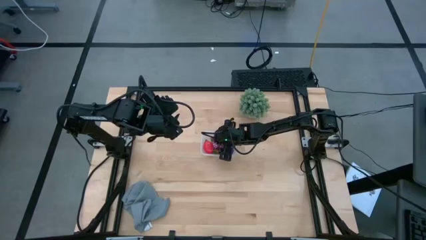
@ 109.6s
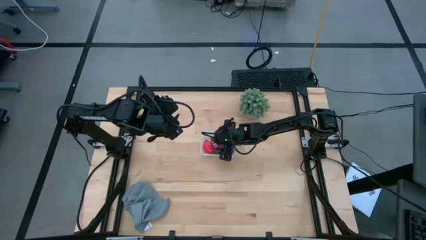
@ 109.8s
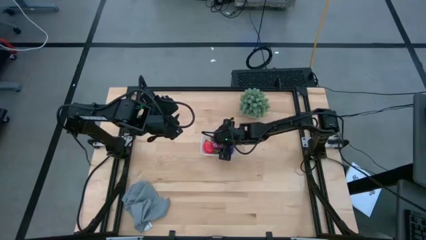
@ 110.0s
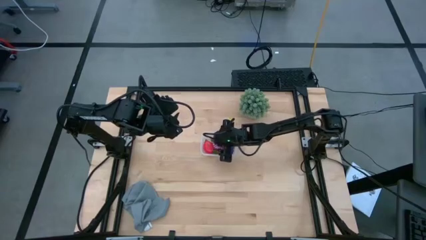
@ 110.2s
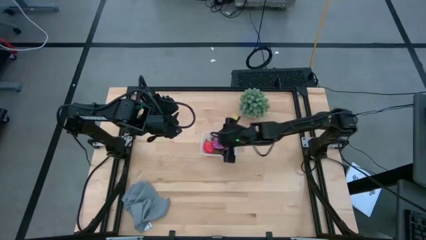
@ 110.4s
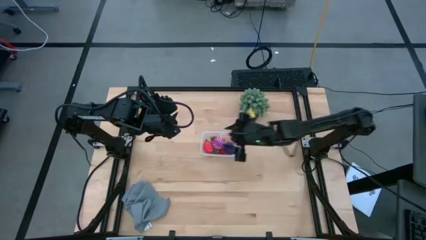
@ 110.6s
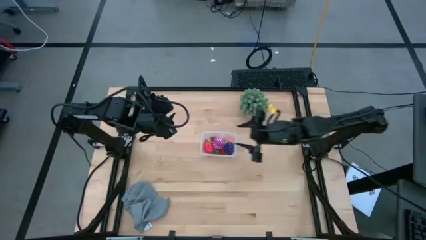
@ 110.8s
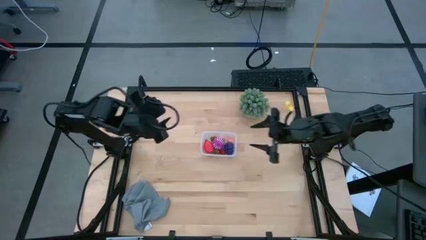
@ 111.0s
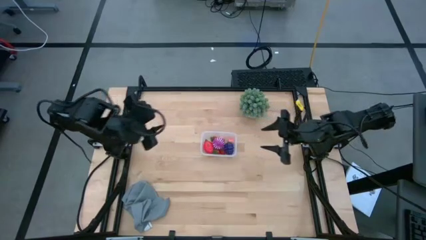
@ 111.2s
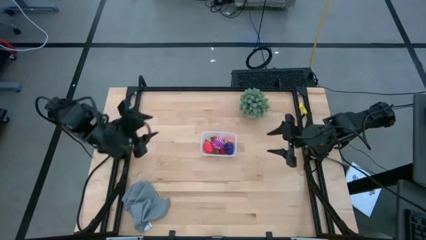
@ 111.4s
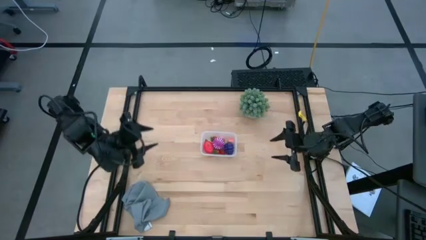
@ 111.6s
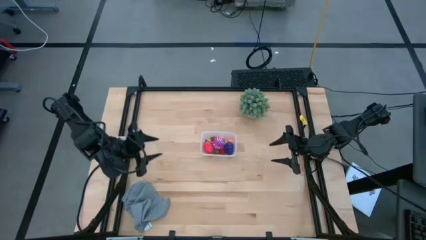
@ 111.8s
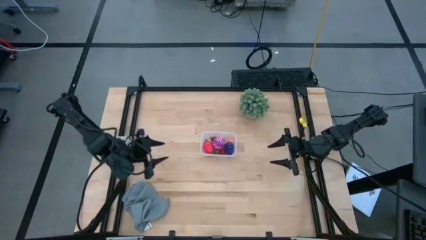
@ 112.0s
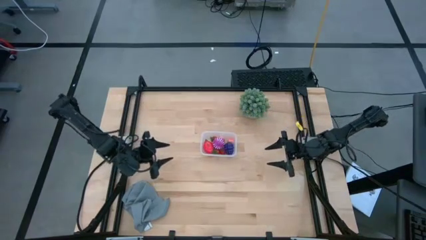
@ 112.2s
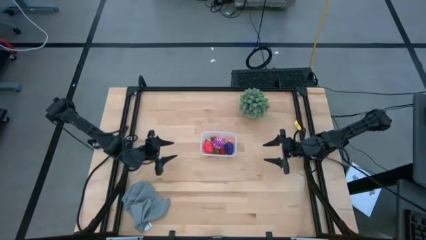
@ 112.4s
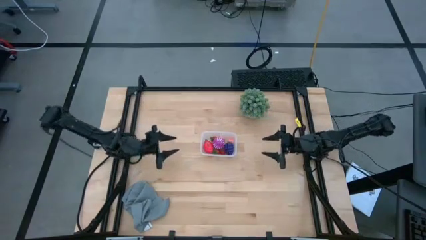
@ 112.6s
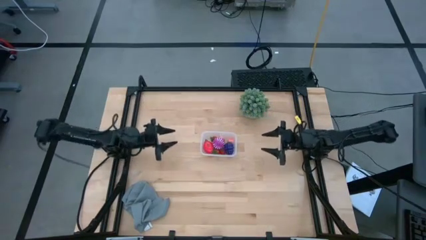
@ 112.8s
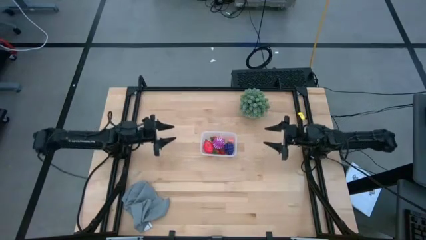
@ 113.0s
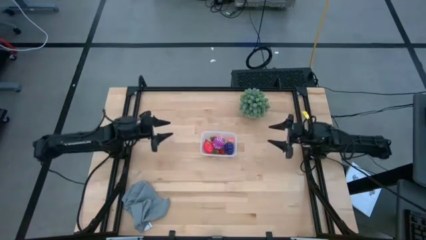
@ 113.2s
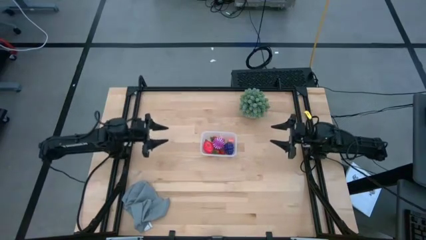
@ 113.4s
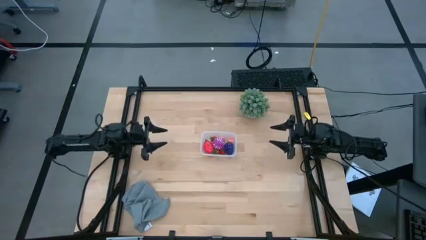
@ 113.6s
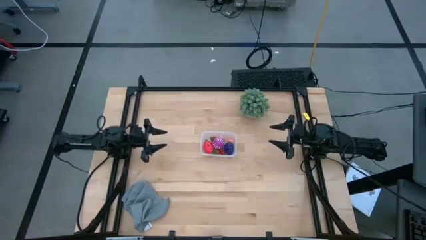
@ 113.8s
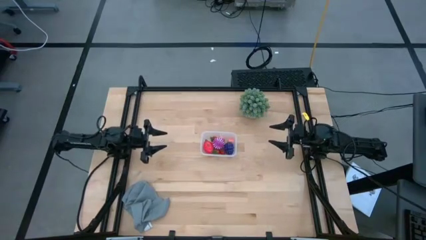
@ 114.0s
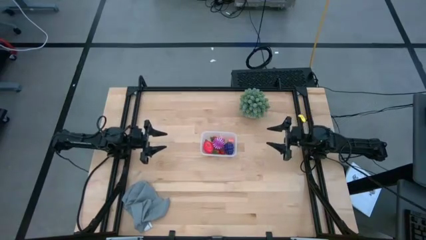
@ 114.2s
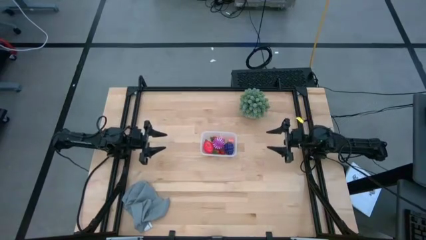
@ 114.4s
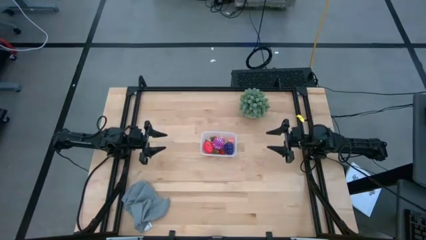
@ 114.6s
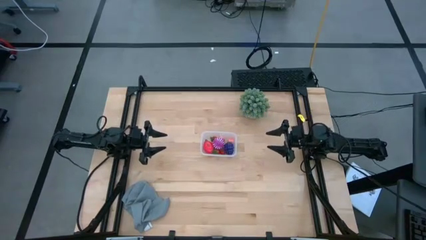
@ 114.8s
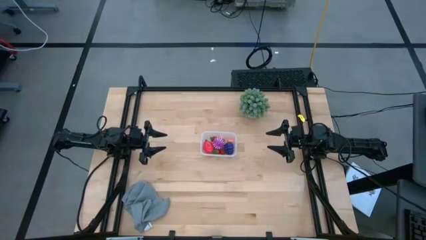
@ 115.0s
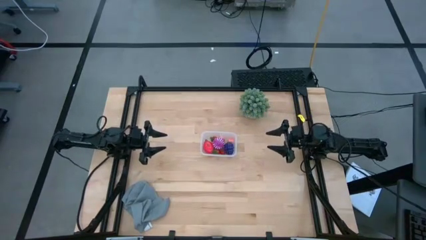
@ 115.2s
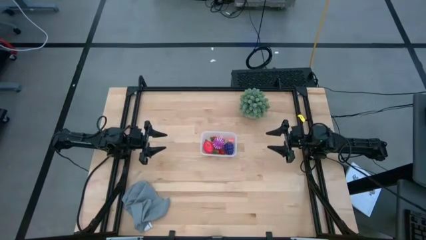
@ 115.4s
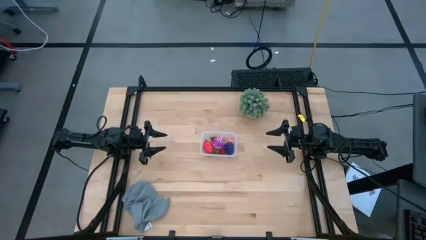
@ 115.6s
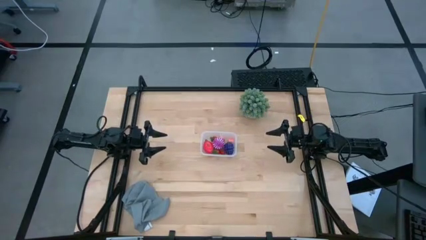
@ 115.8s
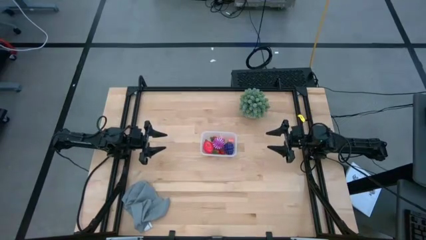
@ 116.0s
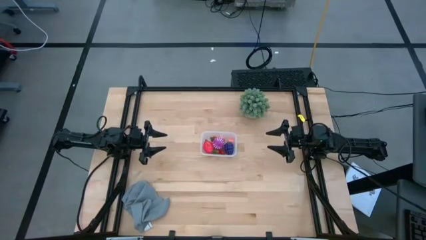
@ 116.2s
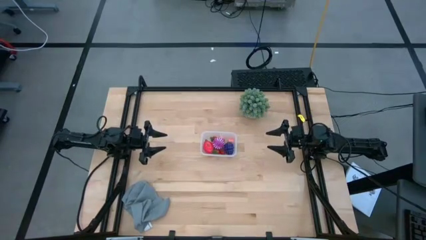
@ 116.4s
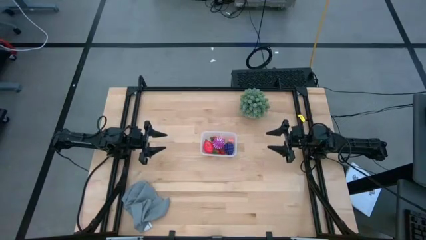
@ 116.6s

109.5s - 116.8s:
Task: Pick and placing Produce into tupperware
Return to Home Position

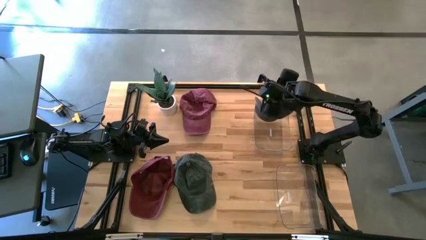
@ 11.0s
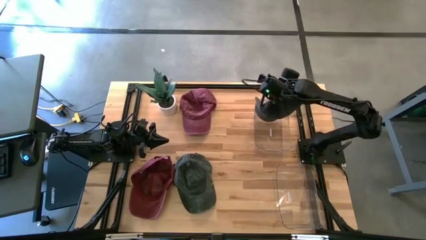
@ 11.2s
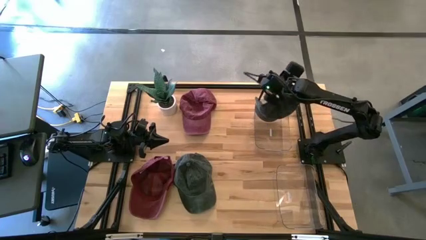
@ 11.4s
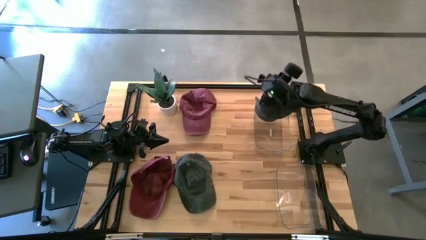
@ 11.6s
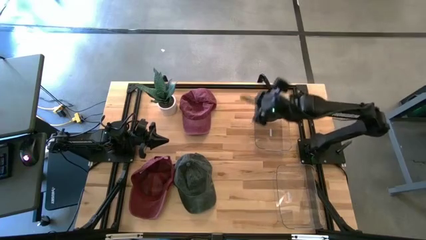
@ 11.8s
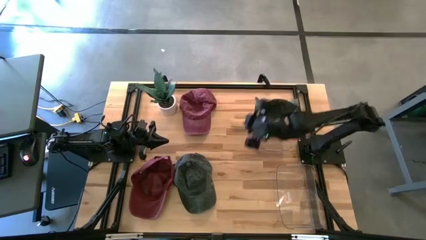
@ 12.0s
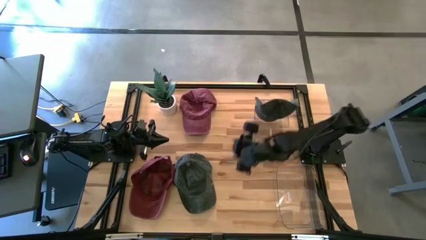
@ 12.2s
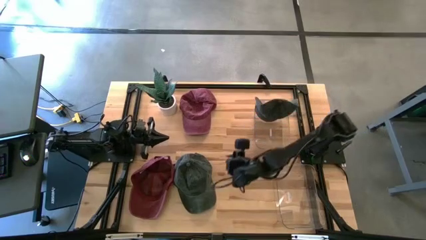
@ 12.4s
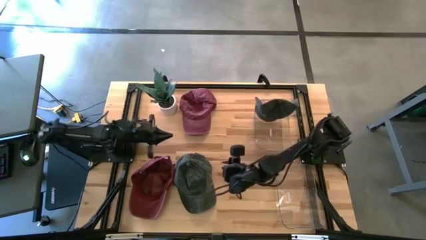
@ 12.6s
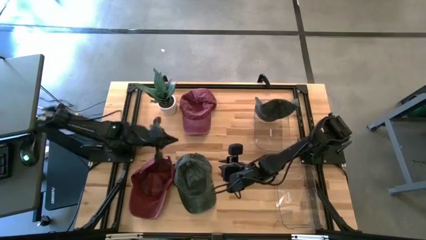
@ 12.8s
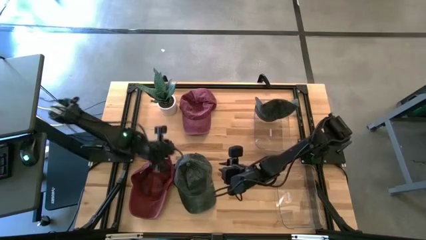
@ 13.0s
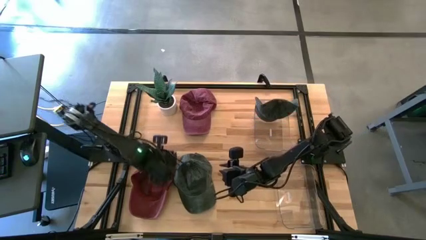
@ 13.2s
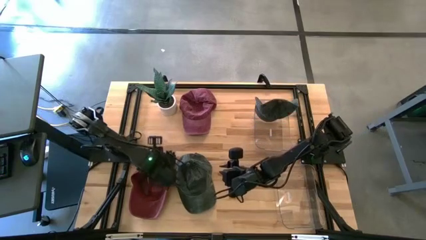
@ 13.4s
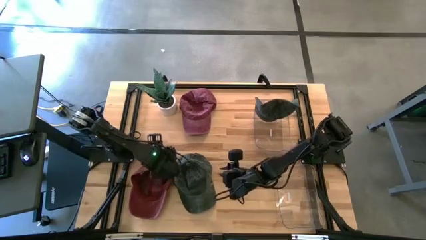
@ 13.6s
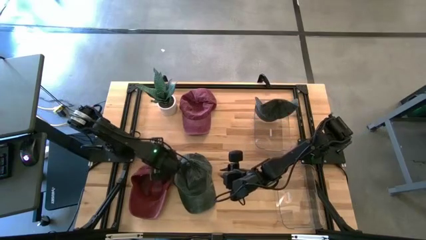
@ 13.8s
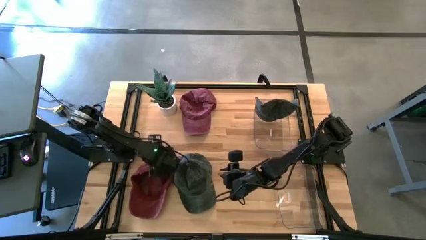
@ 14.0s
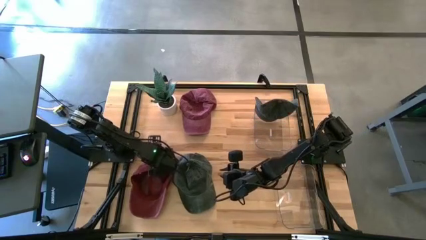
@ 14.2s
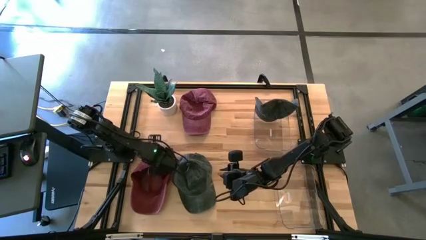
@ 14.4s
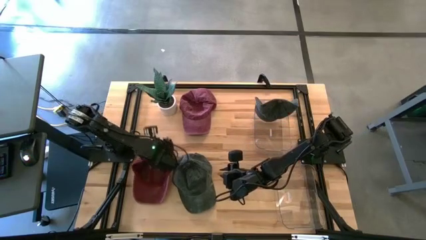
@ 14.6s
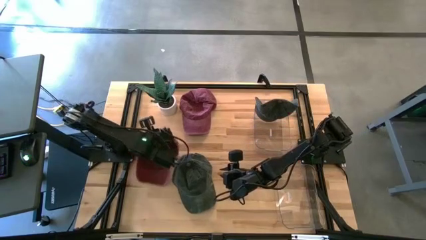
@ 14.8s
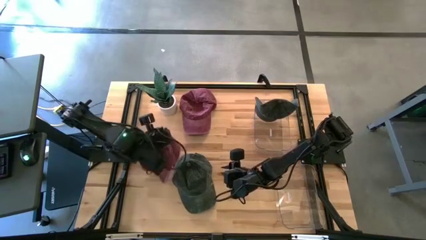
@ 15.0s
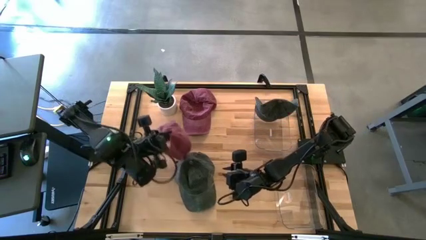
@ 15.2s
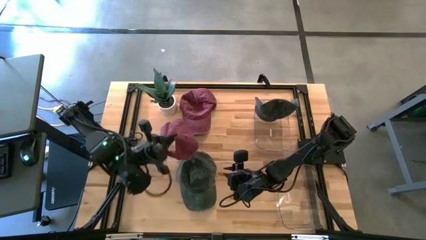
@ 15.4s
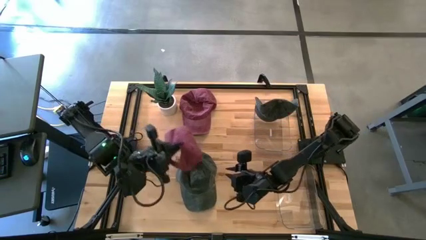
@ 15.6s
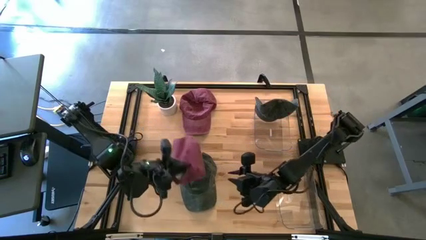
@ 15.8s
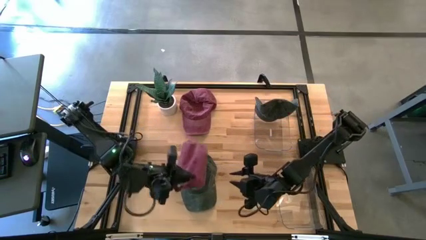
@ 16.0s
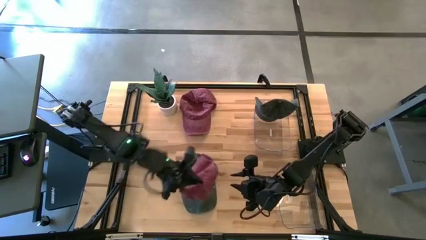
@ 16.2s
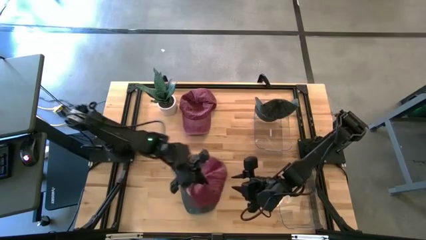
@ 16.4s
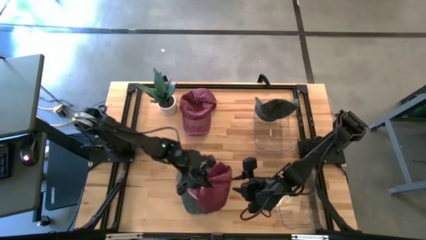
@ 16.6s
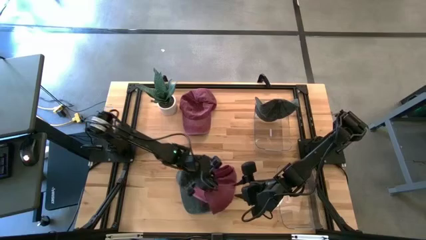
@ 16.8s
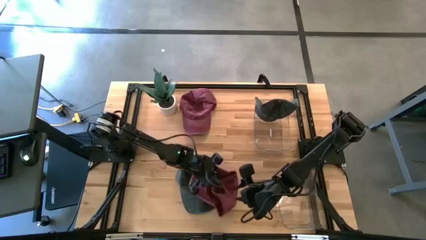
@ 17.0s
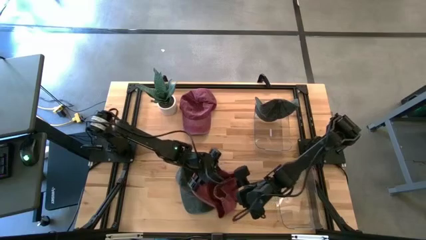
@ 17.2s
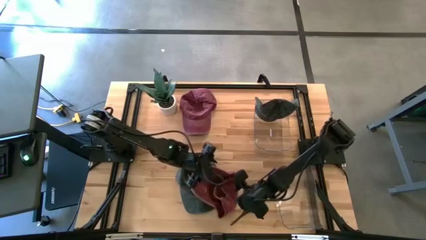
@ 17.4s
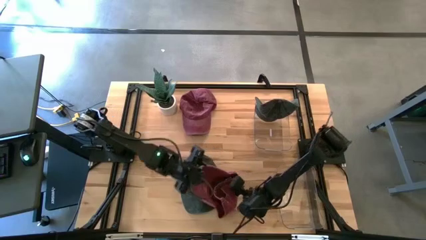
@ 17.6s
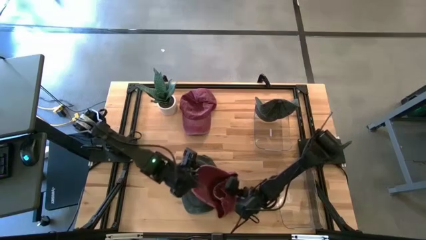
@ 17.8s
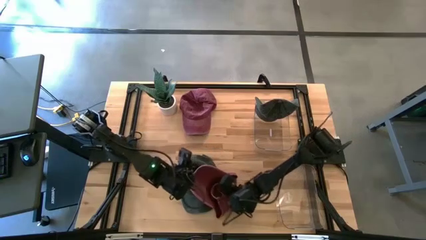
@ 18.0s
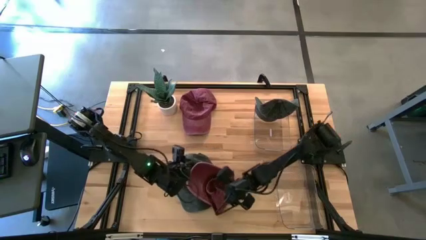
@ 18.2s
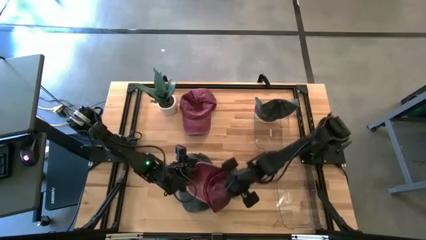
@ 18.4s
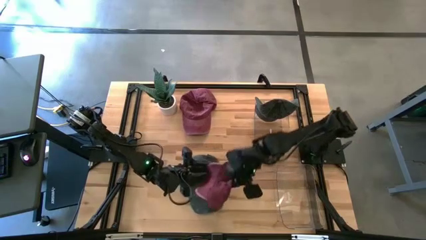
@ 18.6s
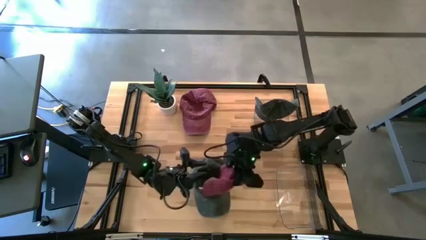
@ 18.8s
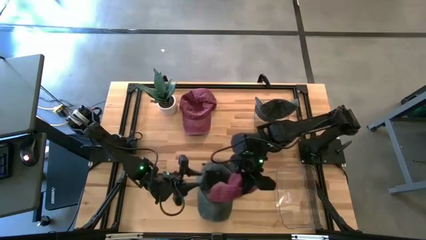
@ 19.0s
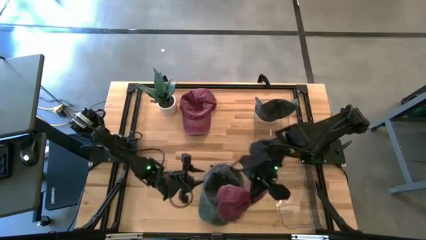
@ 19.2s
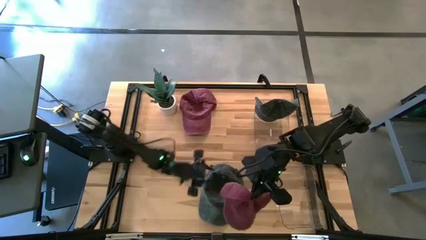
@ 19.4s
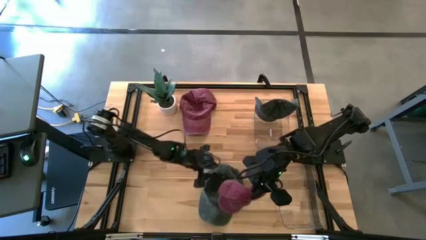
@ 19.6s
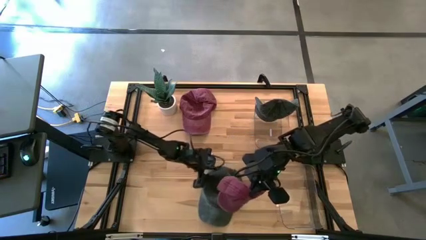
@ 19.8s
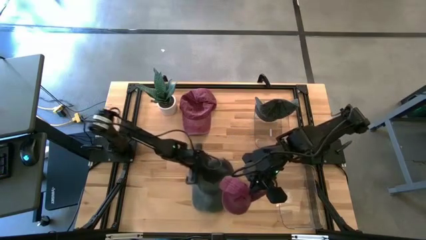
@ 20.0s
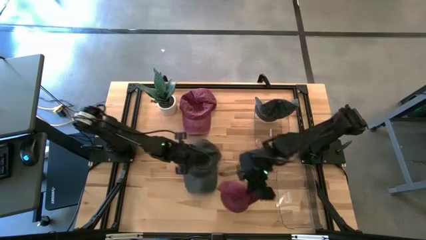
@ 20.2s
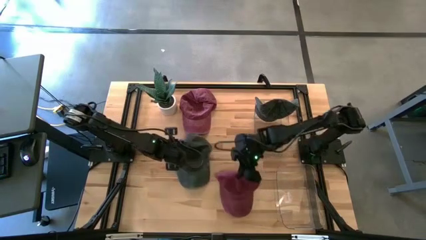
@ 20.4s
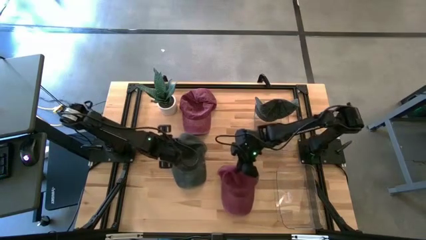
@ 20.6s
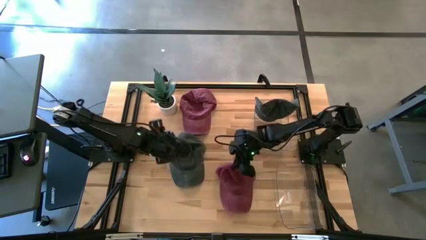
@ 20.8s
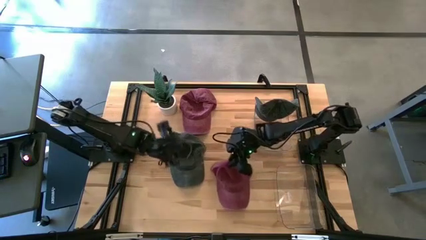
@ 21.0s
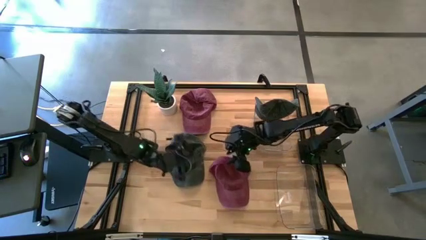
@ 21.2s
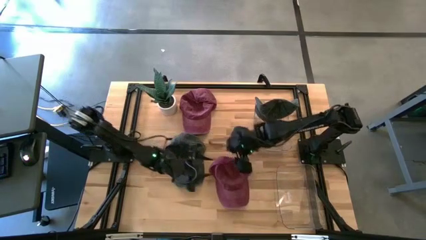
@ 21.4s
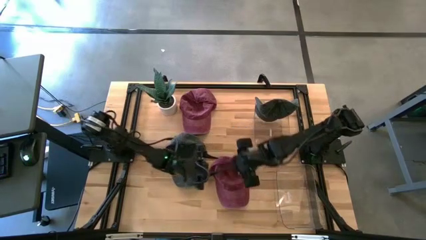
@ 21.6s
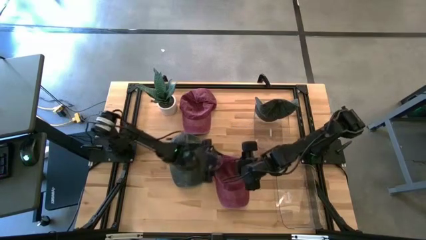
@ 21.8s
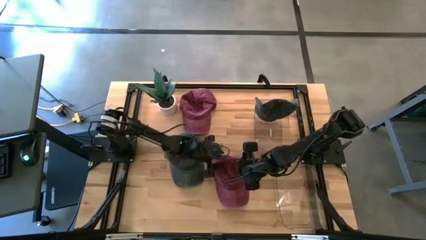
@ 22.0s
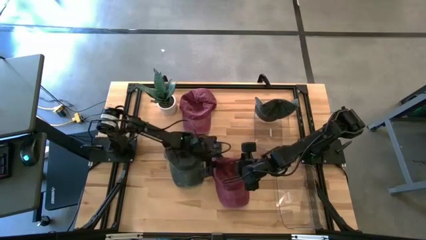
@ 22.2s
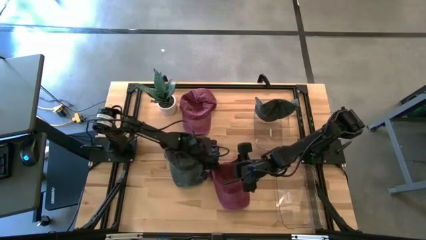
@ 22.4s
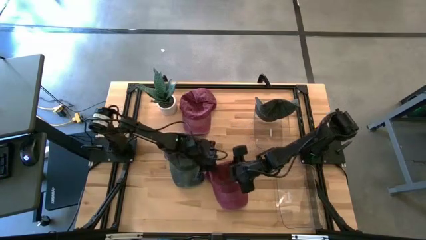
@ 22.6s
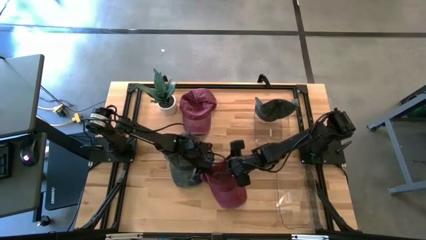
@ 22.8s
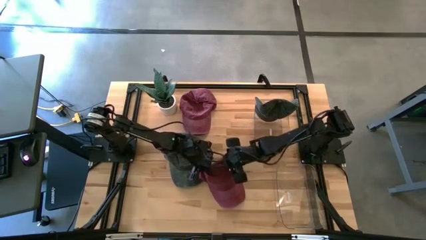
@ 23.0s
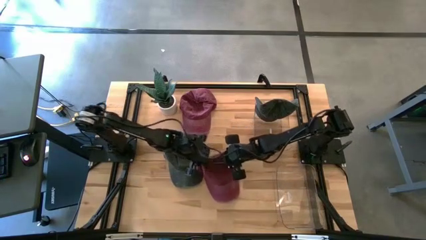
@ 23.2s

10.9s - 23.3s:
Task: Pick & Place hat
Put the bottom red cap into the bottom transparent bin
